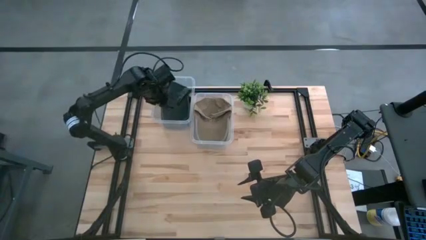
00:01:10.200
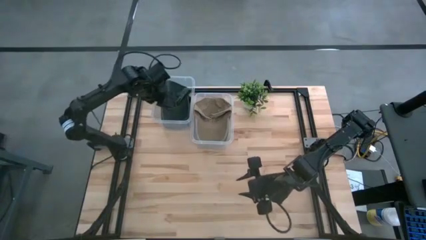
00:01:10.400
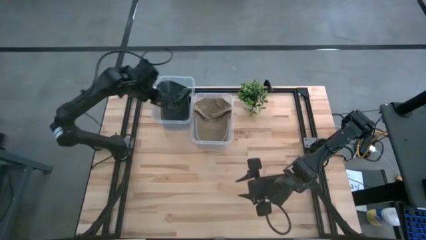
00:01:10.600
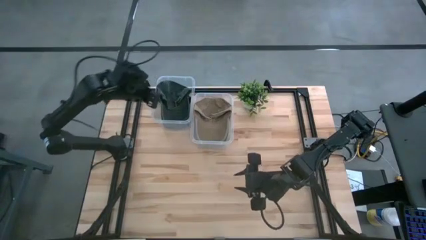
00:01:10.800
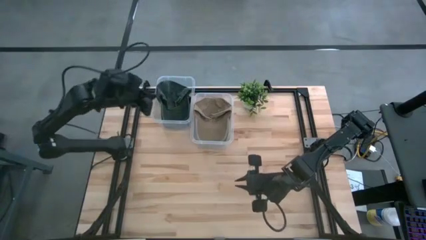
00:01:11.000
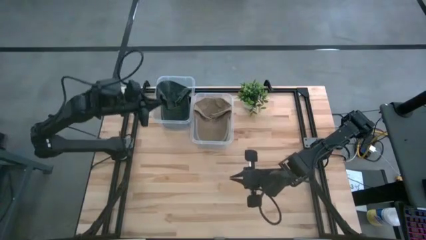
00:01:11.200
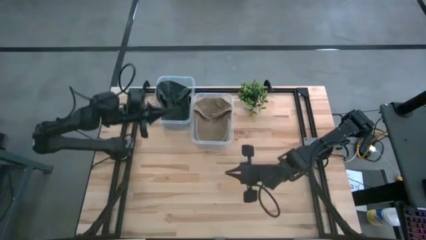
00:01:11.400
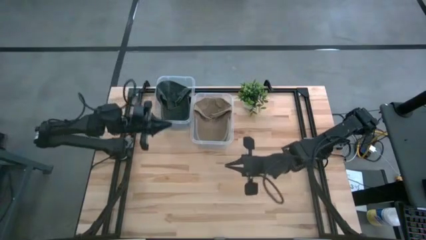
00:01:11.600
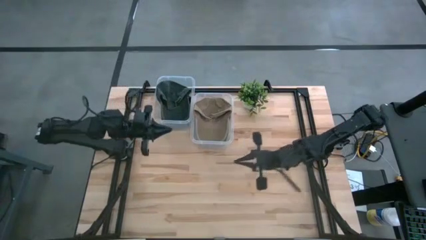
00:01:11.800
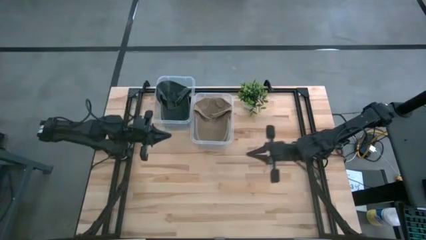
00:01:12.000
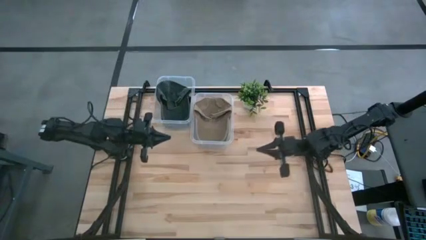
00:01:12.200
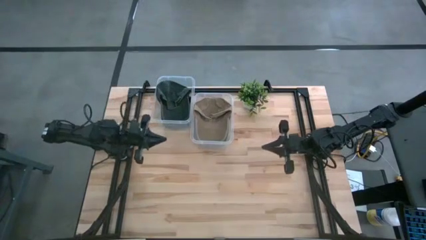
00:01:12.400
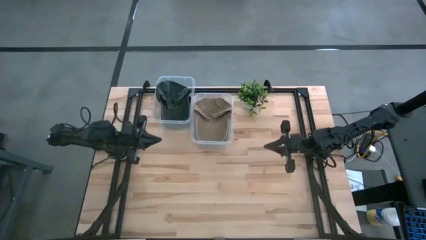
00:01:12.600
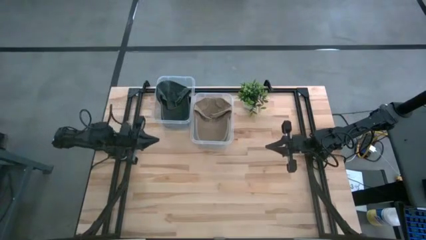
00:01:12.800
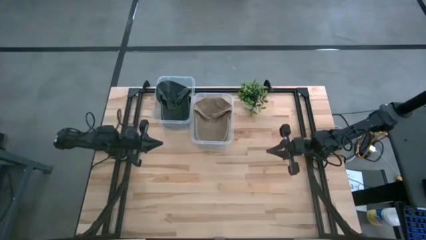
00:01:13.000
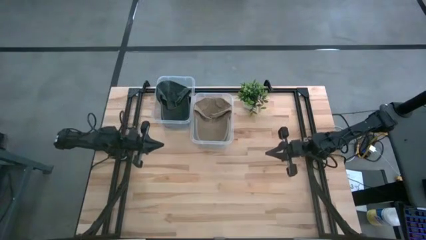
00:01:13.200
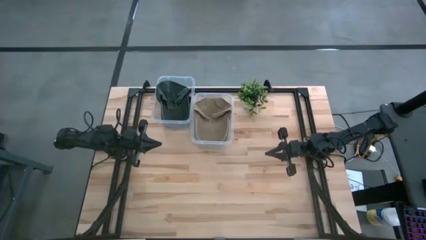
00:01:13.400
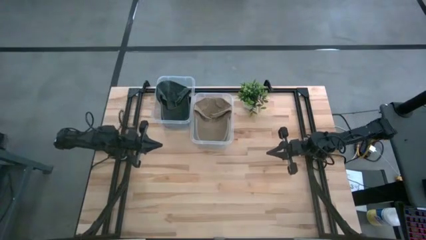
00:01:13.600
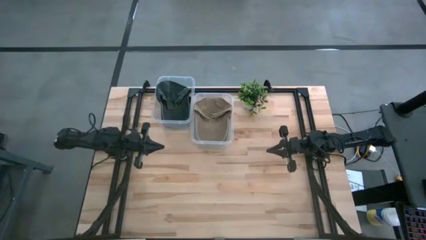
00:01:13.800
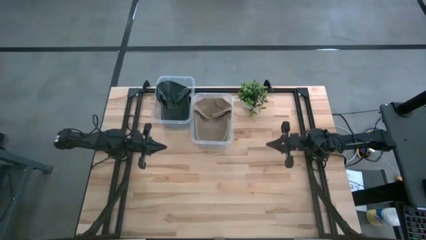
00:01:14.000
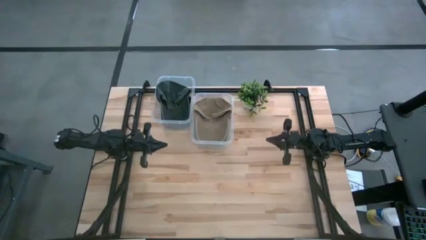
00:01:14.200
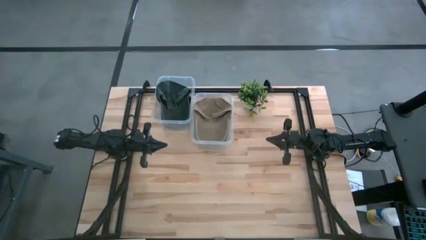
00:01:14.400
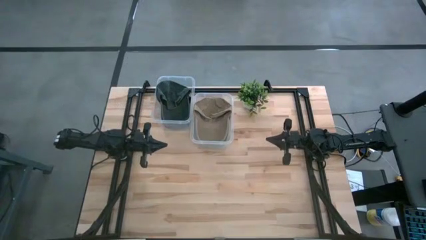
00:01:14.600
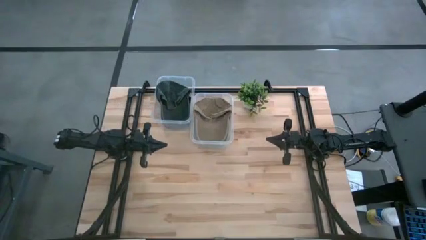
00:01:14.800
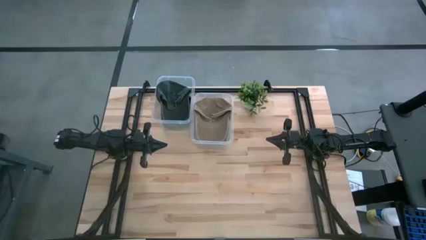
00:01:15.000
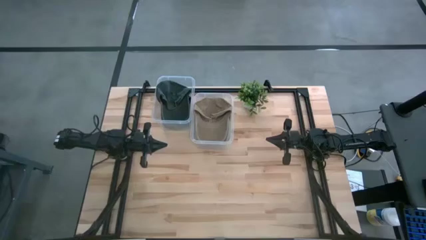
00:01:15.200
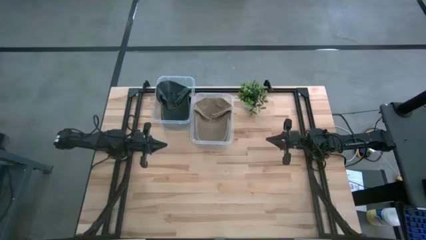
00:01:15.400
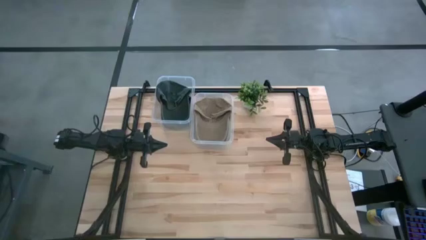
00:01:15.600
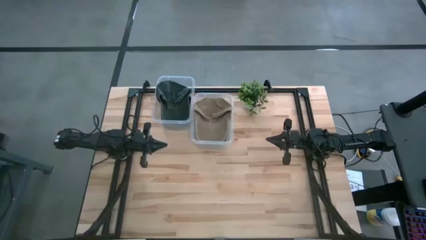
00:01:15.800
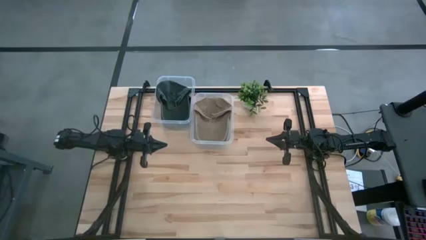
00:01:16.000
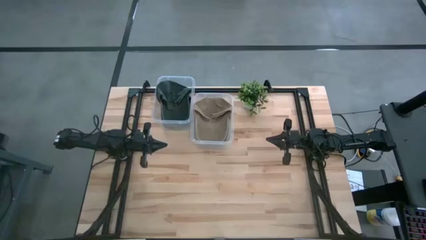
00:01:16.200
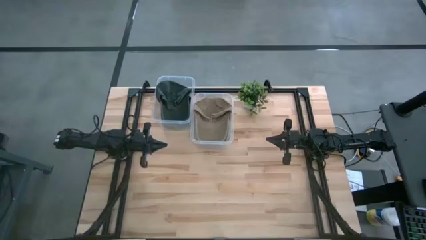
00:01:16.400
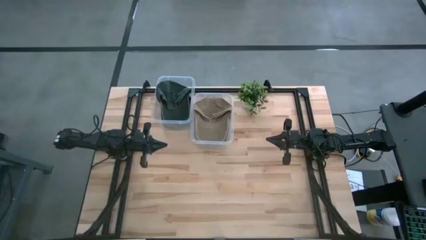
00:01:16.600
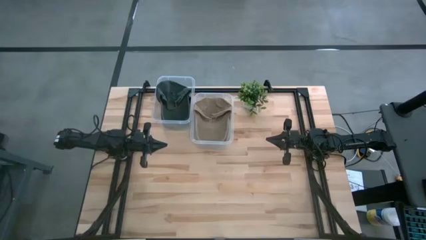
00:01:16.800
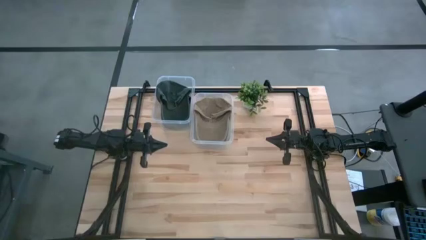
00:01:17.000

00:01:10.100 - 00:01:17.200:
Task: Pick & Place hat
Return to Home Position
